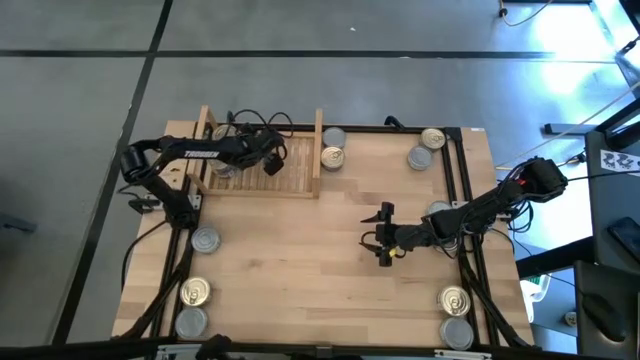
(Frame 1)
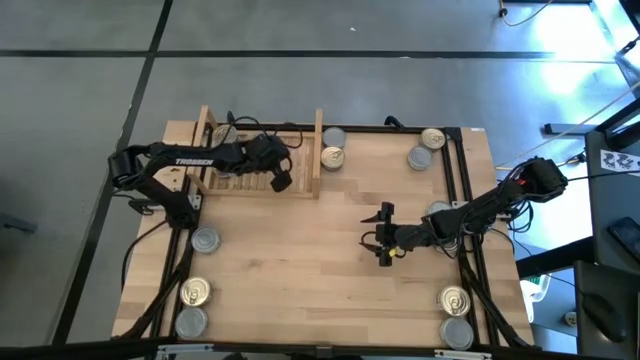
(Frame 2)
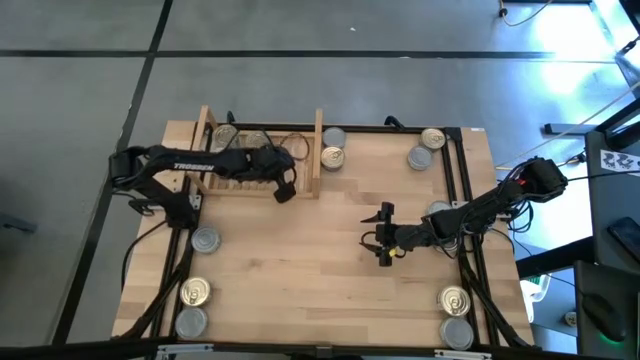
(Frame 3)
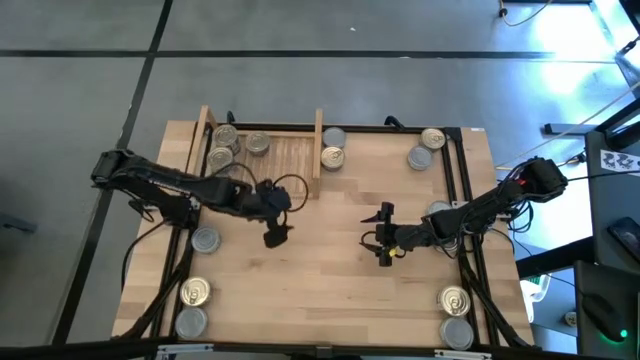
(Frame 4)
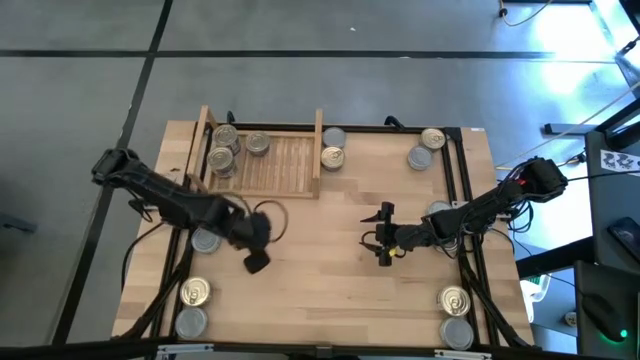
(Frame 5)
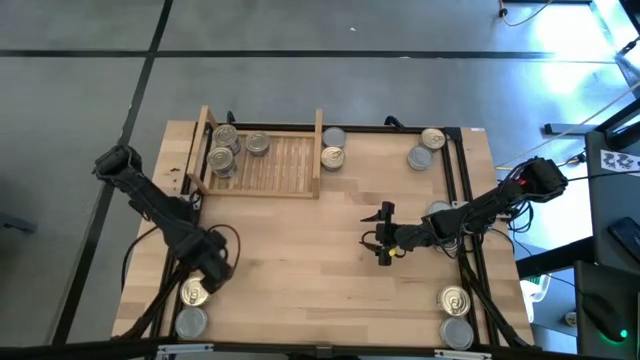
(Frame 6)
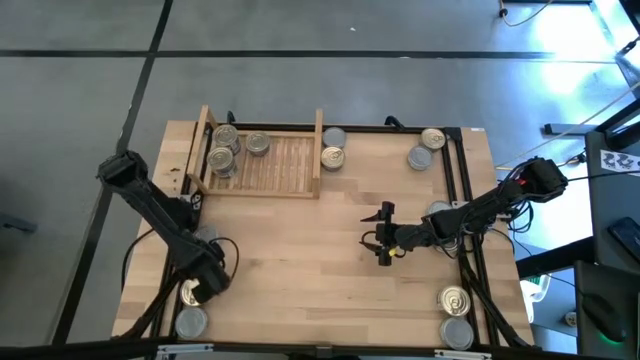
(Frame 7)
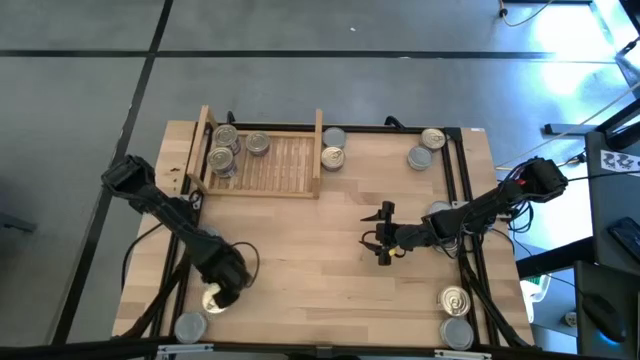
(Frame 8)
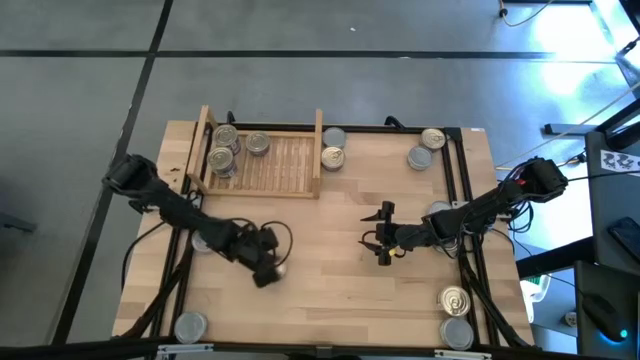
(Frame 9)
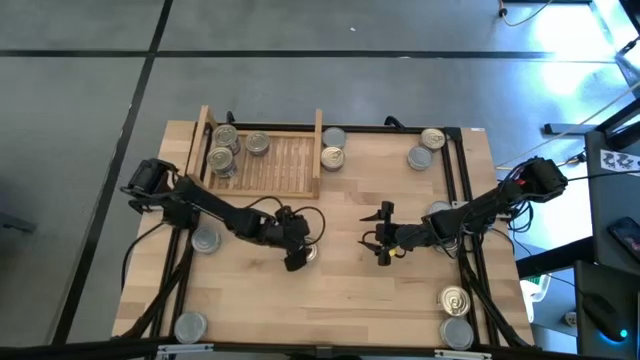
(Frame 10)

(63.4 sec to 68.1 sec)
Task: Stack canned seafood by type on shelf
Move the blue tuna can from the bottom left to the center

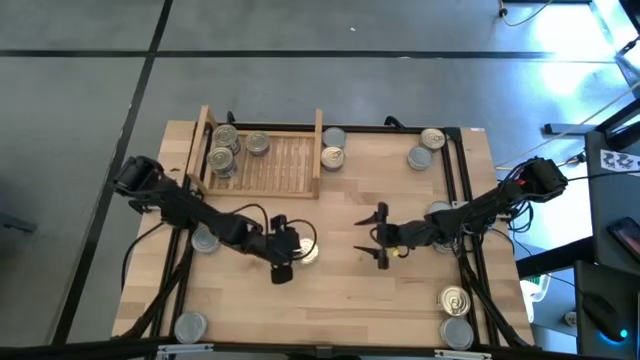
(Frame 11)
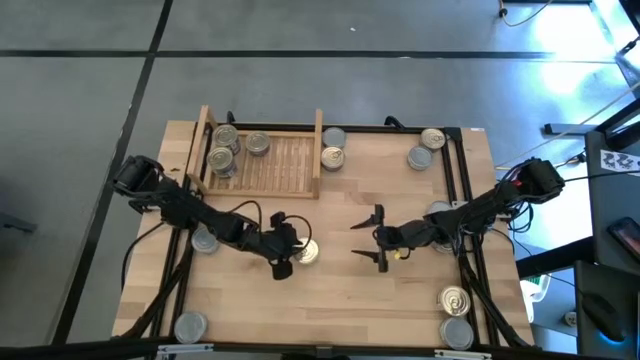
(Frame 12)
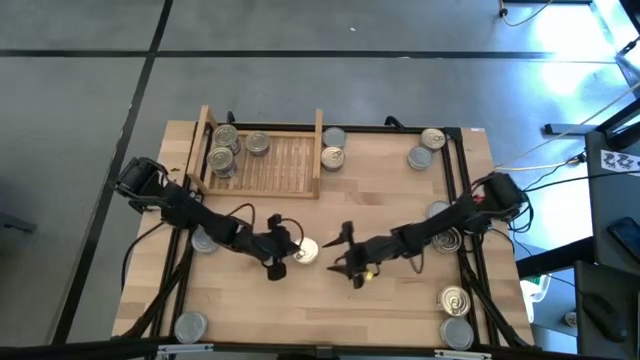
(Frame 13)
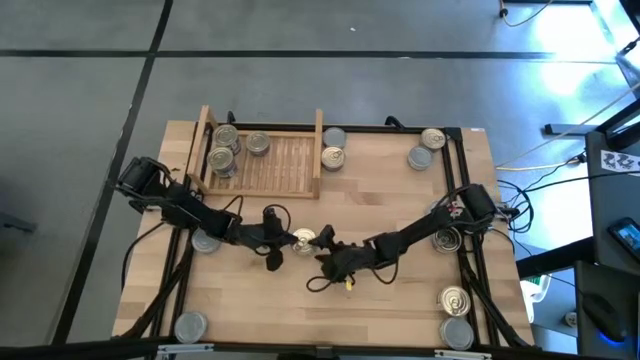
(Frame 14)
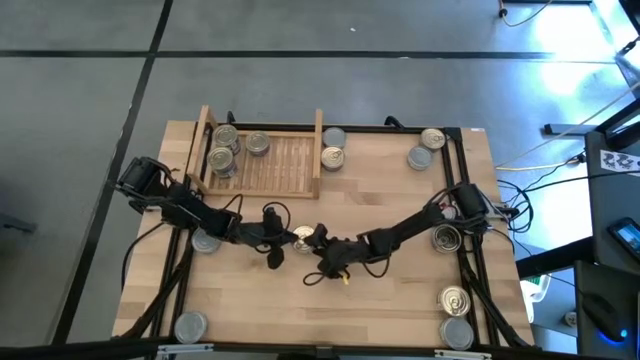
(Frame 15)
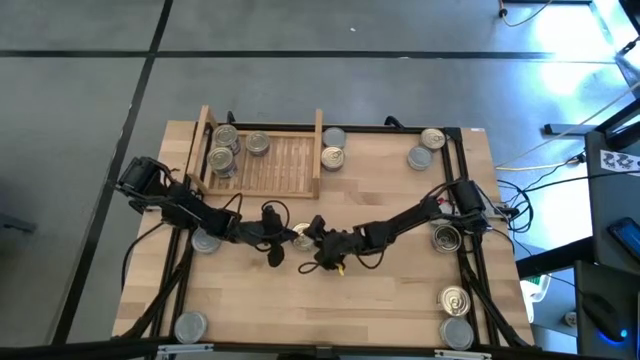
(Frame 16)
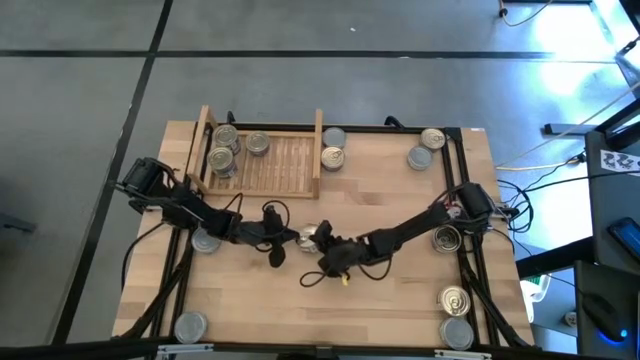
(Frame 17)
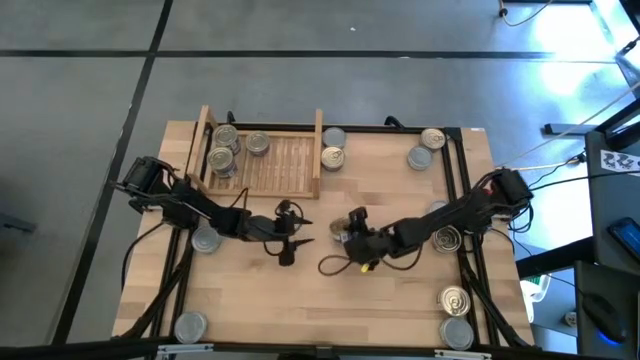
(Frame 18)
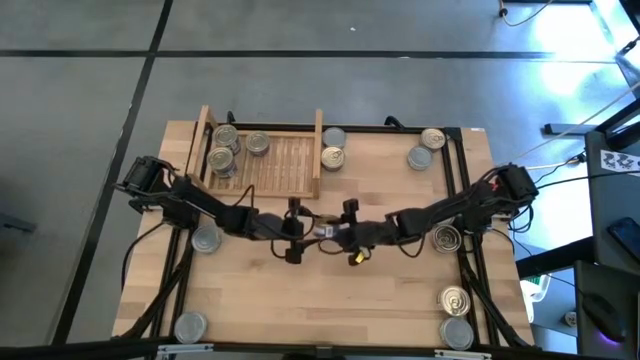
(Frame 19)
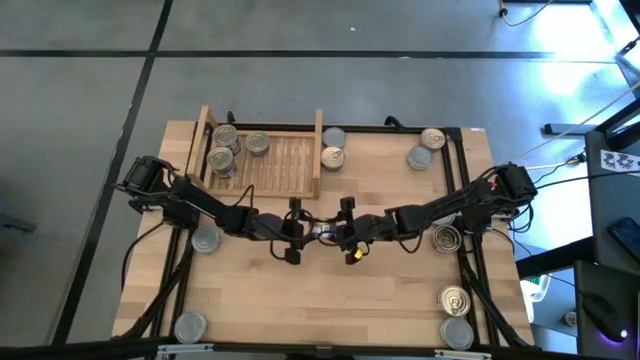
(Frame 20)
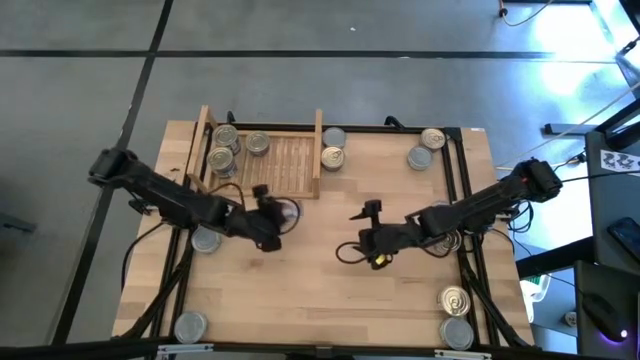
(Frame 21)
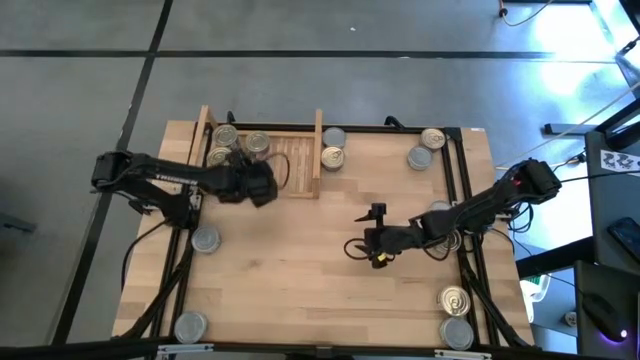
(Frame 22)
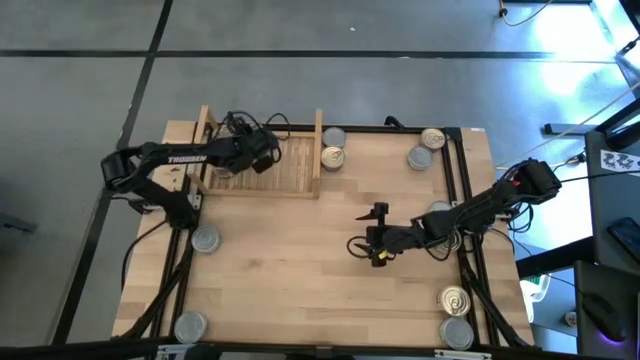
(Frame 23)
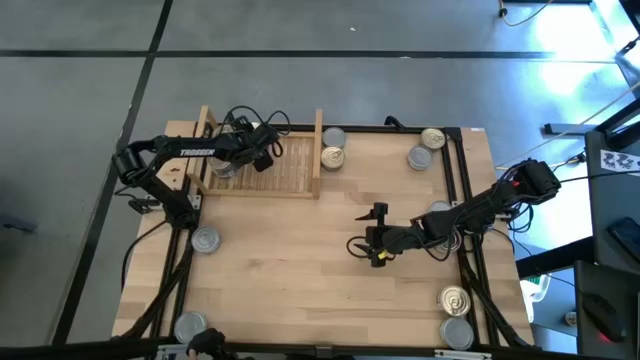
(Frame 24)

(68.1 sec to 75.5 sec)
Stack the blue tuna can on top of the other blue tuna can on the shelf

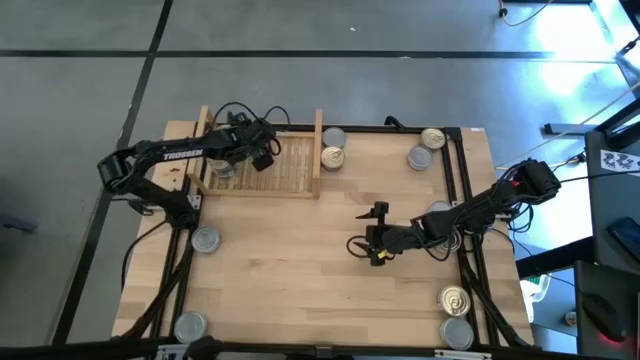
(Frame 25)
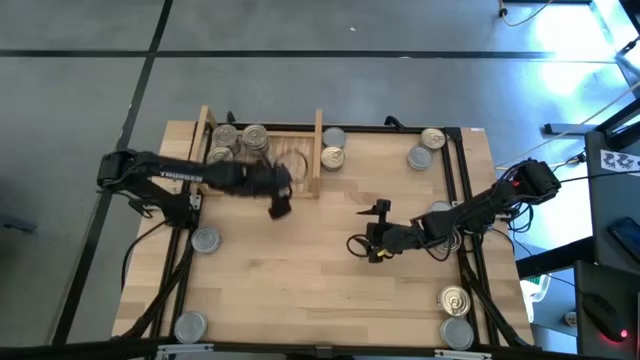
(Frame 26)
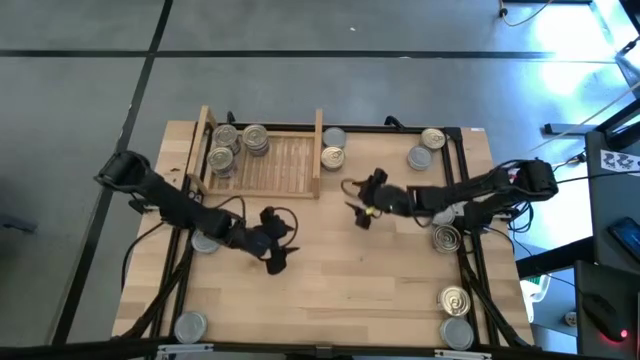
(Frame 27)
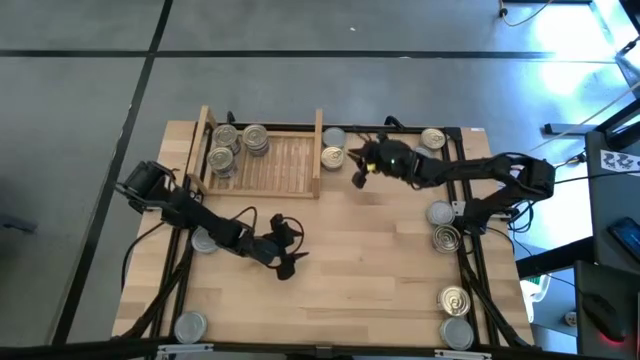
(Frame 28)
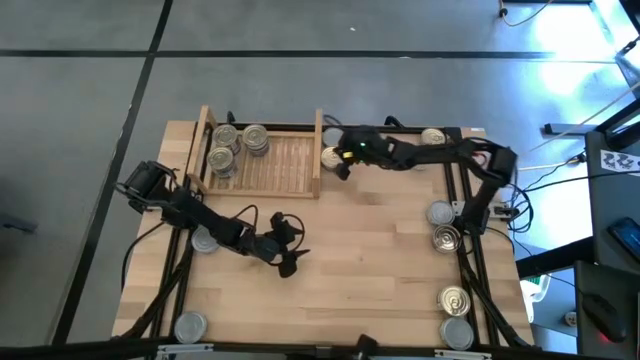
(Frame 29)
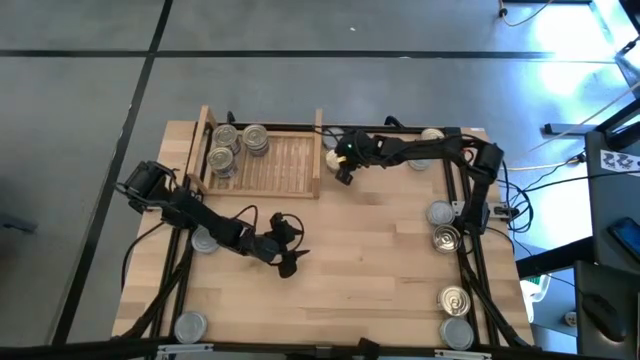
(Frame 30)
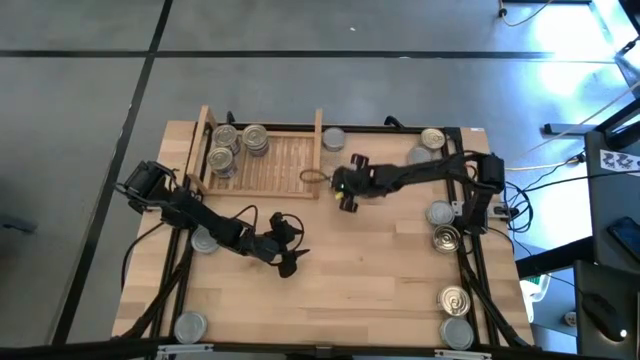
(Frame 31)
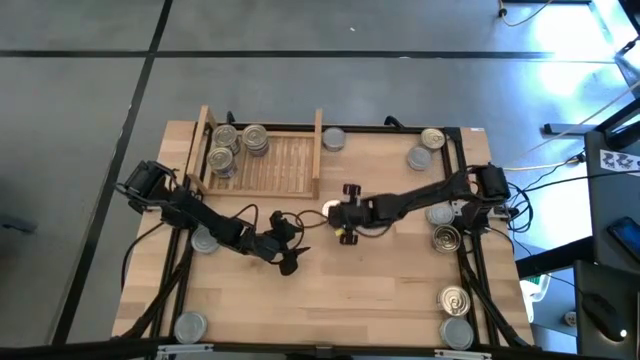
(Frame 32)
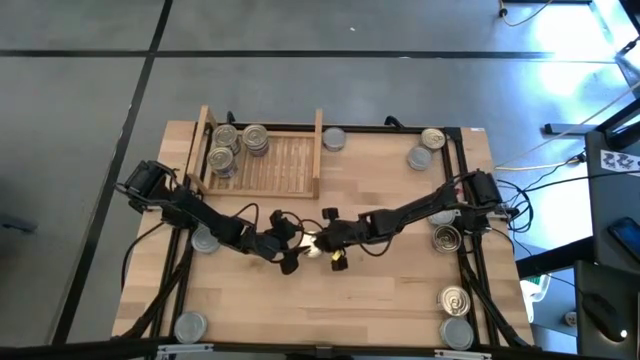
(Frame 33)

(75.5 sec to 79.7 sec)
Move the blue tuna can from the top center to the center

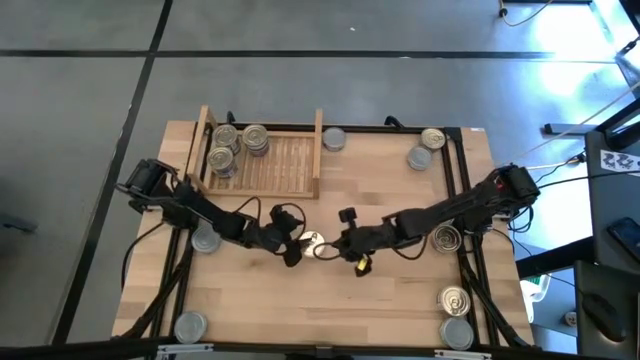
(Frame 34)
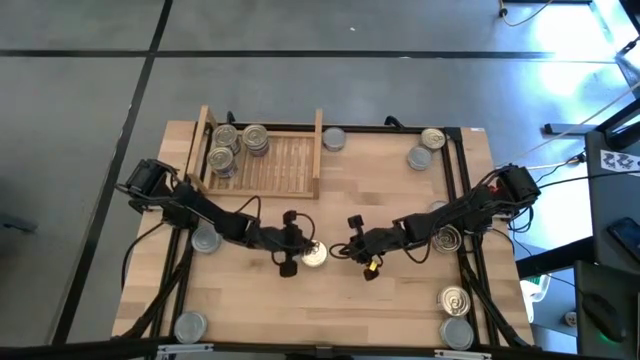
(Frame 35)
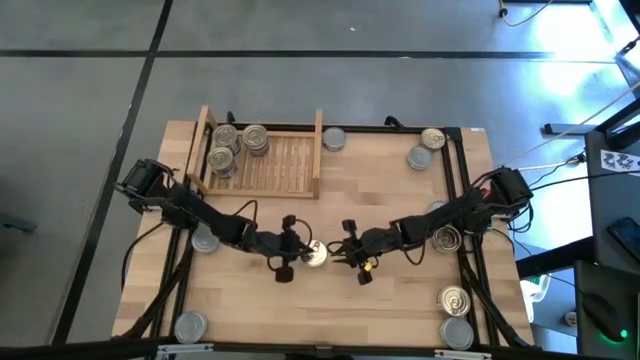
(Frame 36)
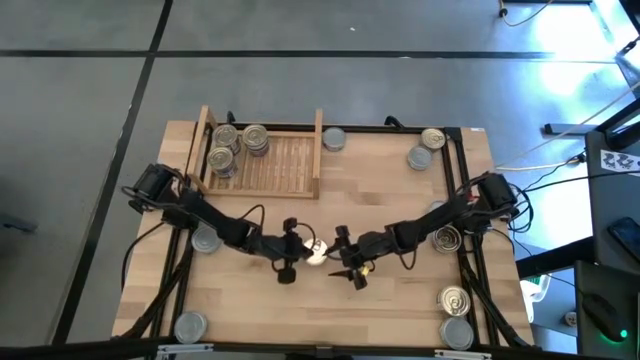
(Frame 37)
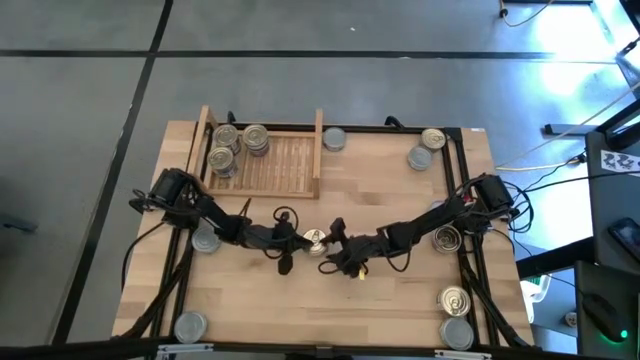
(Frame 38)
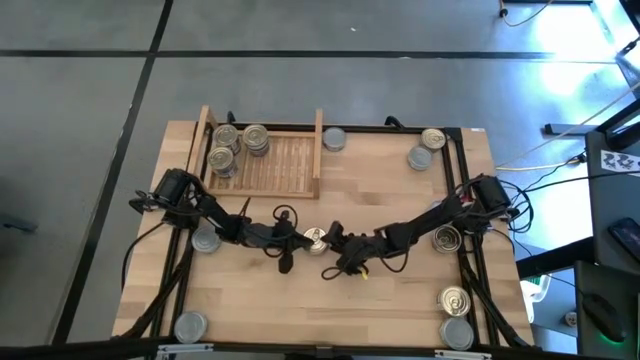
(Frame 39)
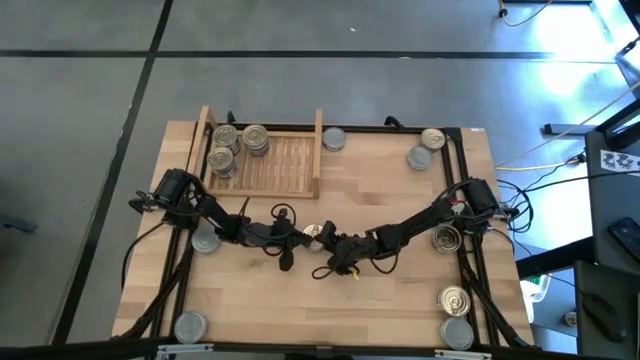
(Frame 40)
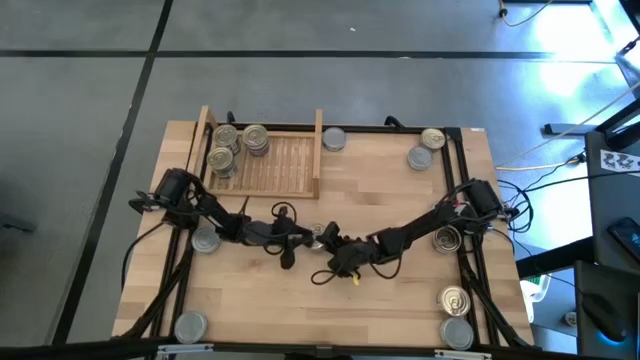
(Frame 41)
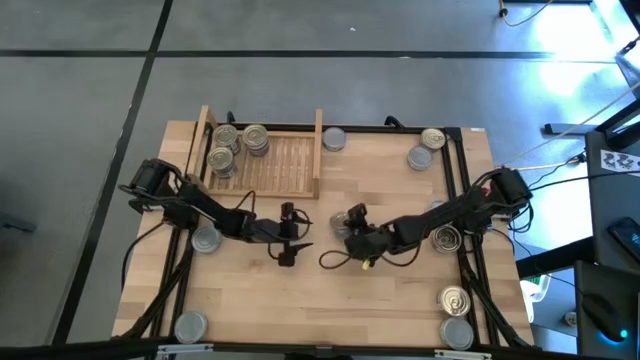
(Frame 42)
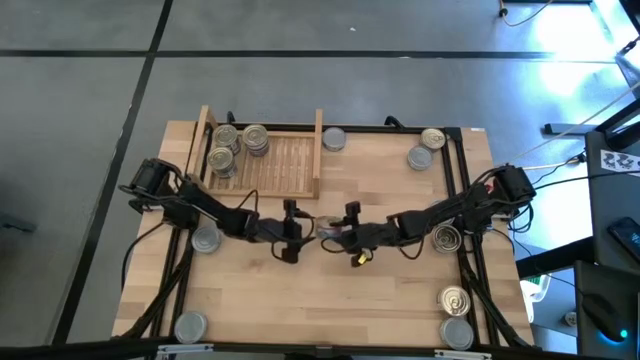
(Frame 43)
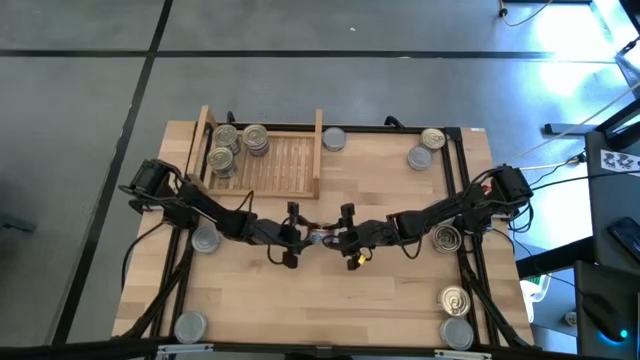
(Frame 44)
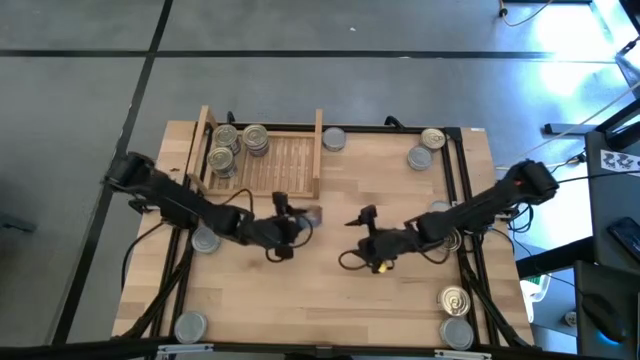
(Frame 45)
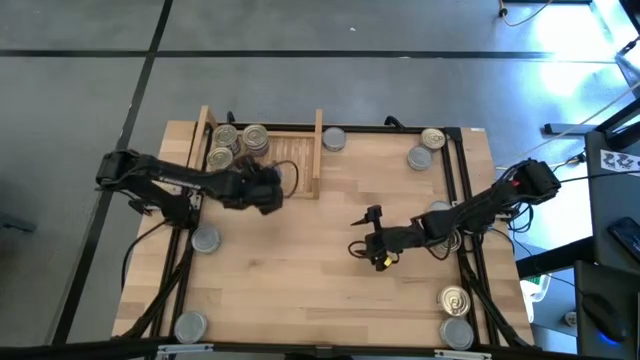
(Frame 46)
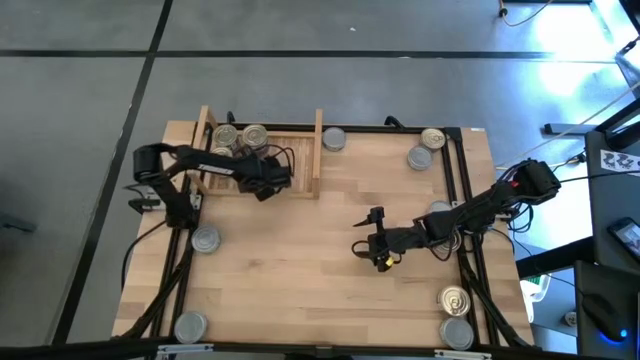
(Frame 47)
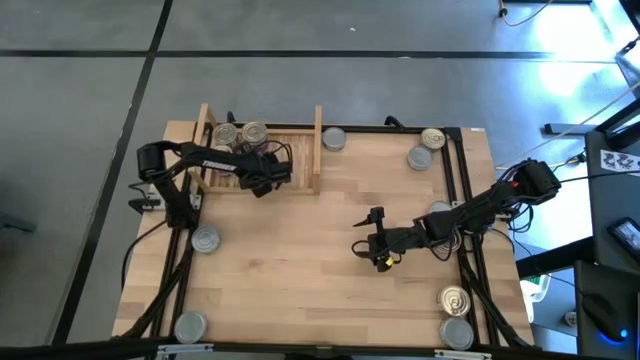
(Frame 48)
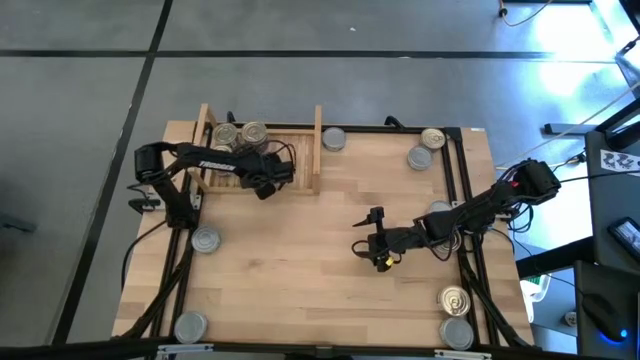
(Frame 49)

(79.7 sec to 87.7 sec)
Put the blue tuna can on the shelf
